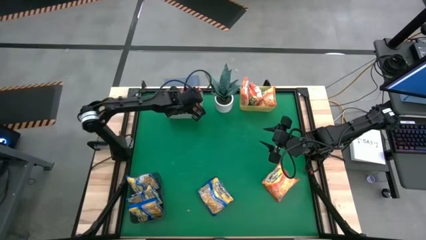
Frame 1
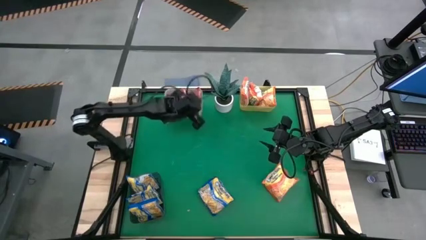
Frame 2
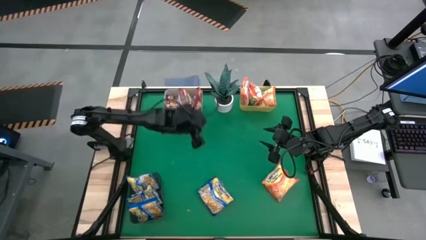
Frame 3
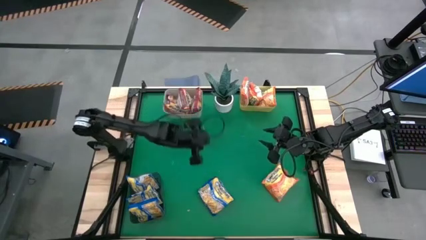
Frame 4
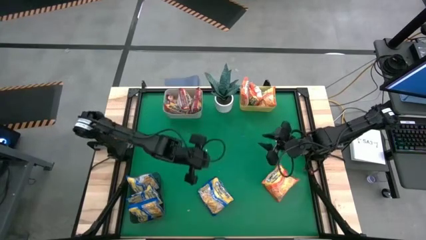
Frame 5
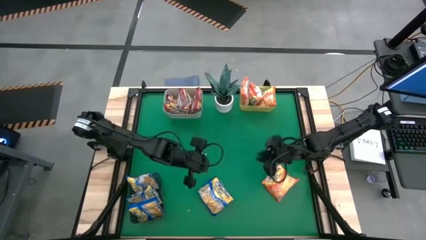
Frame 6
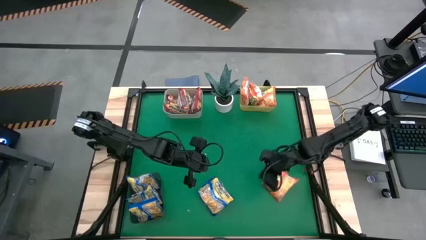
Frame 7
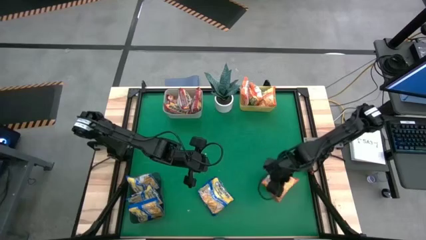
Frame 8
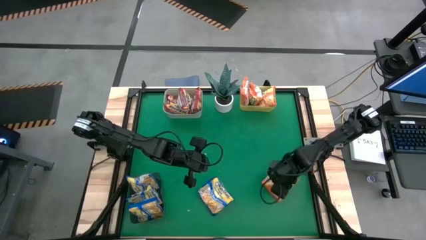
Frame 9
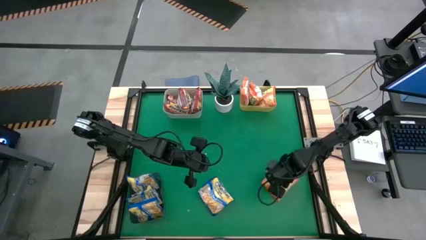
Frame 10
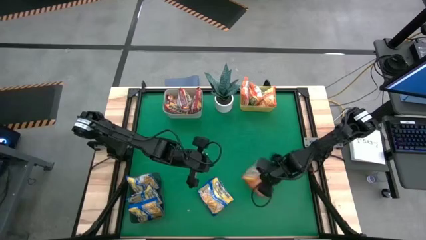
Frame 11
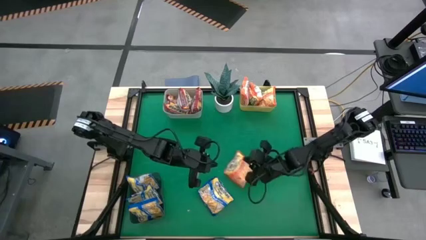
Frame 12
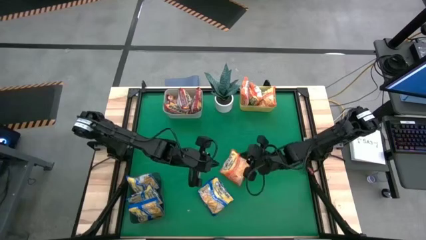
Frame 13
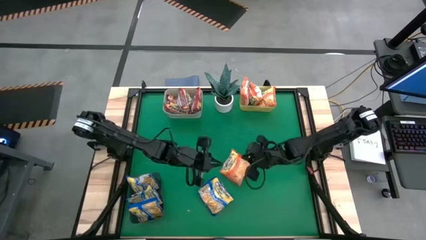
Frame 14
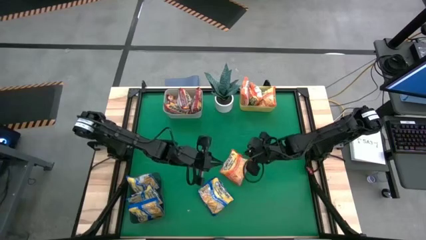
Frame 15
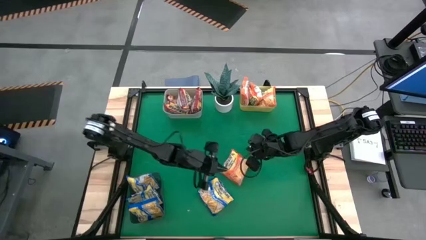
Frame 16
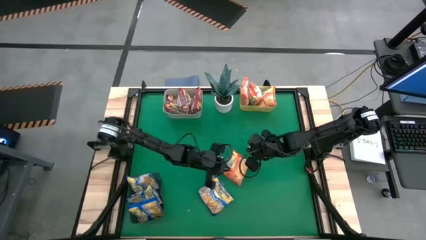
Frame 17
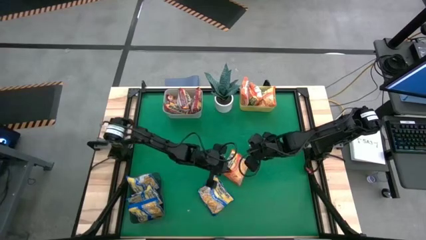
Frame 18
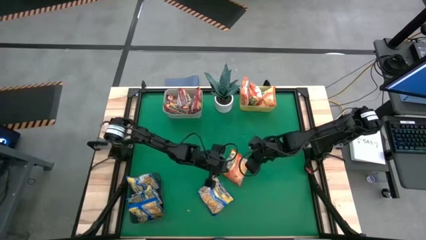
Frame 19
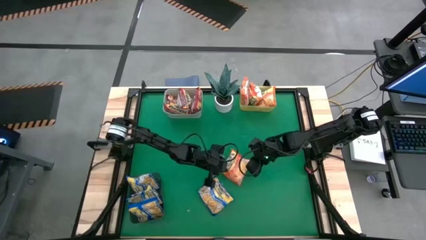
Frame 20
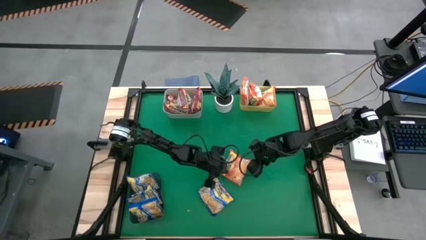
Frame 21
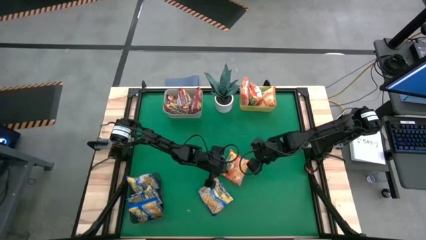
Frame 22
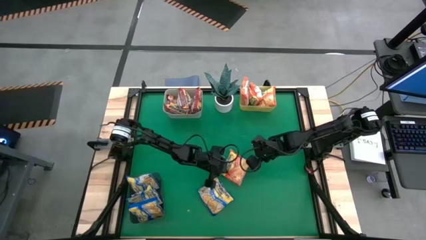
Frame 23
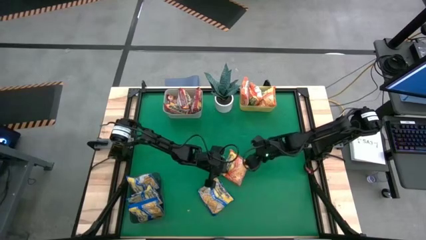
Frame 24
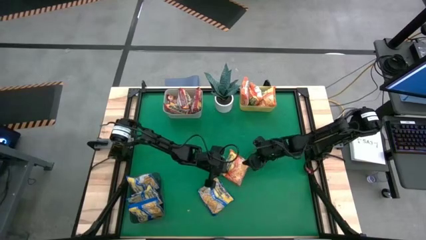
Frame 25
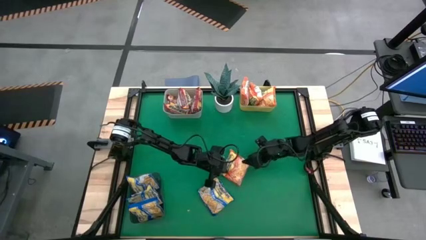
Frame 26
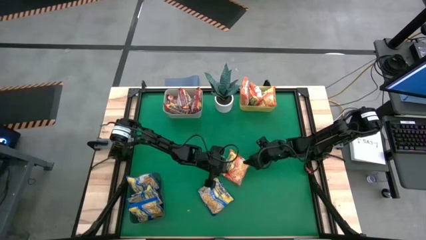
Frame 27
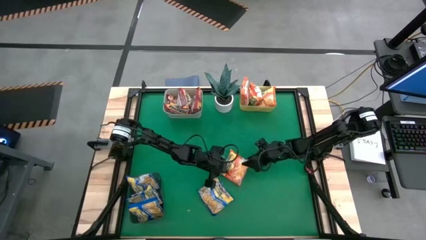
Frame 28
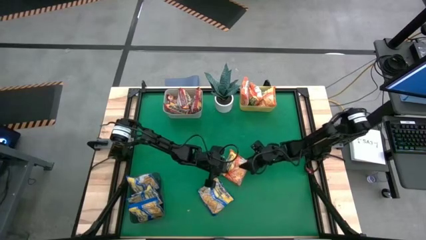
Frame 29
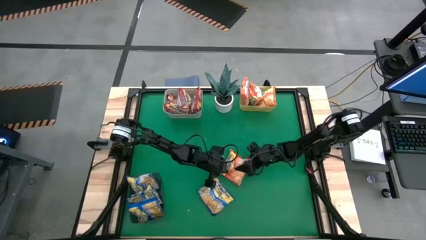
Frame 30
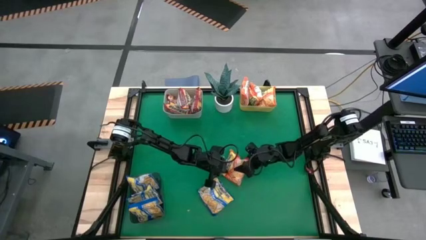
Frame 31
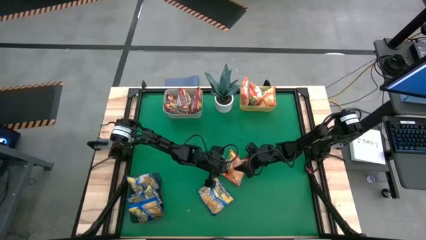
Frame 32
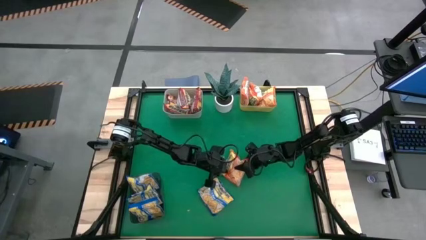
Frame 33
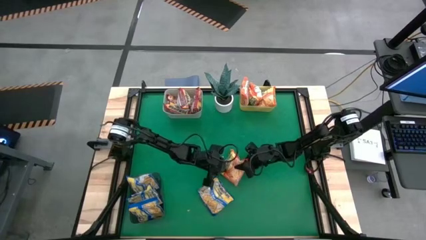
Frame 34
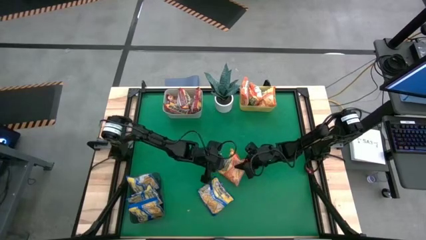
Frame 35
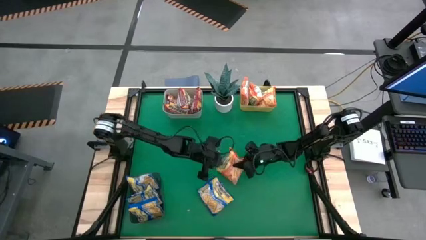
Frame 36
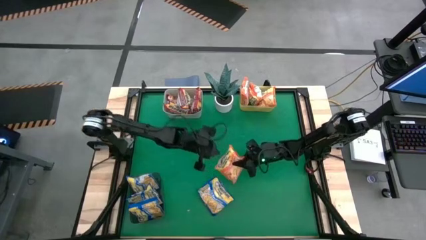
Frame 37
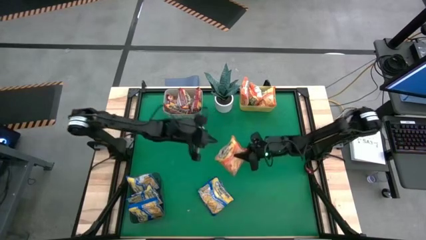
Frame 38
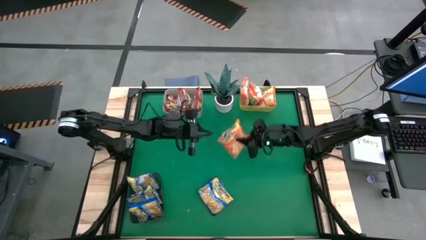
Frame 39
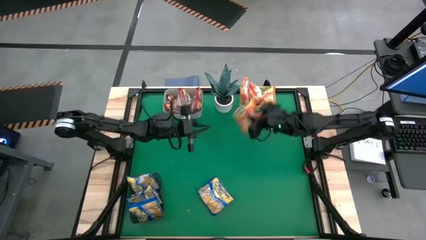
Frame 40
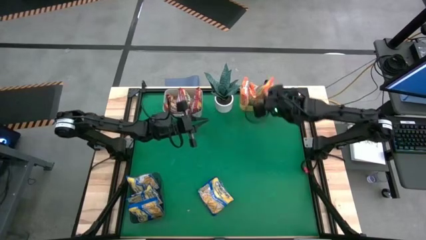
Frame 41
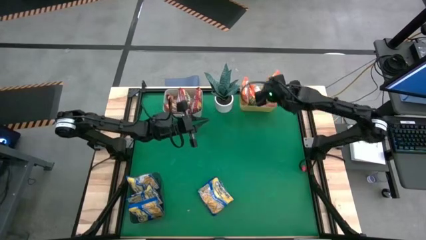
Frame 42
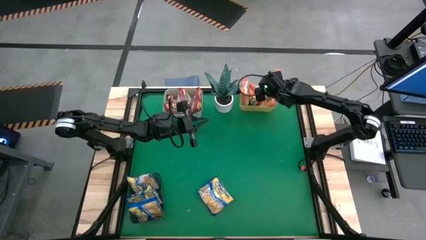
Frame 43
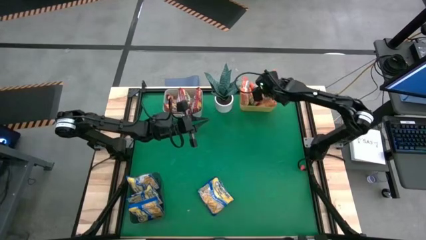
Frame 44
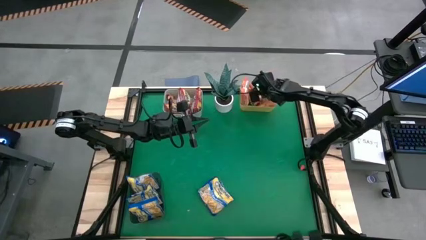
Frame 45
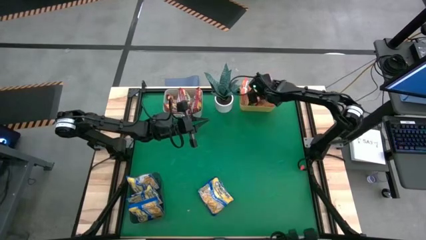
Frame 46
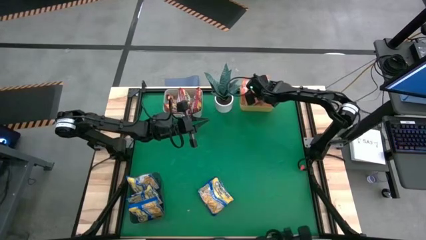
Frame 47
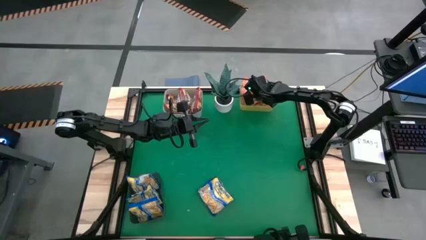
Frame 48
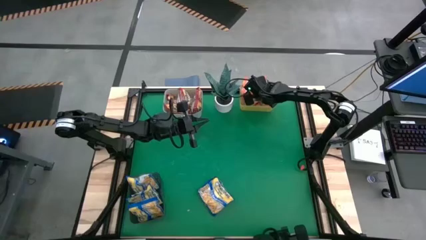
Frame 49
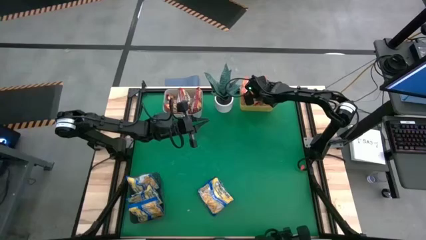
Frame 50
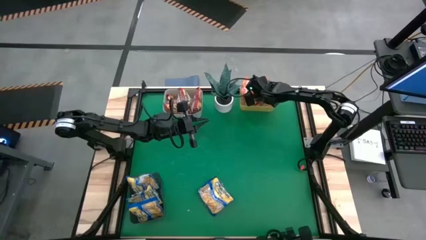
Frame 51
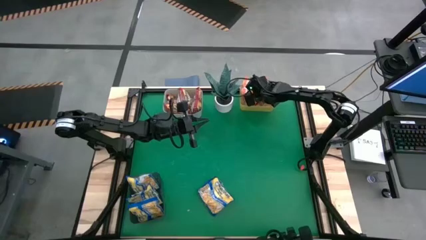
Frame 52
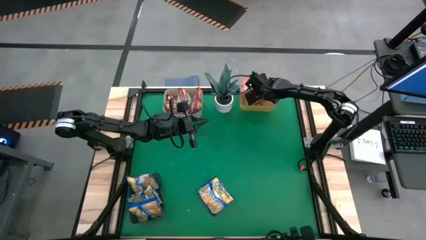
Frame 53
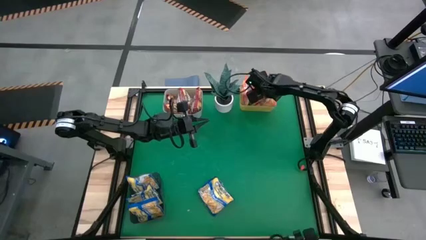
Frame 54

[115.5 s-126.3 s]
Task: Sort Maruchan noodles
Put the orange noodle pack into the yellow bin

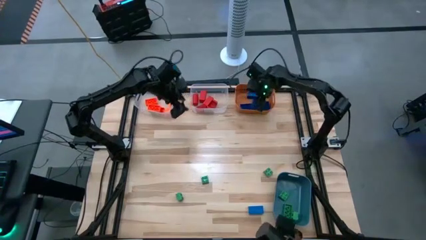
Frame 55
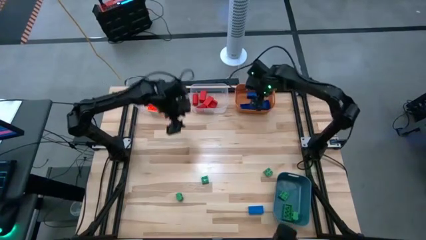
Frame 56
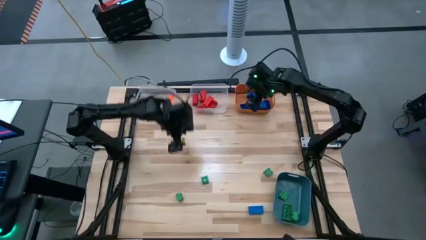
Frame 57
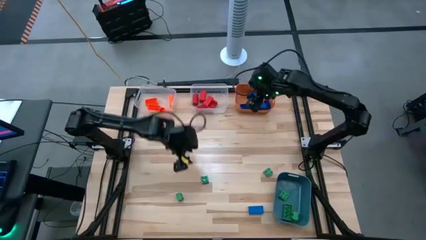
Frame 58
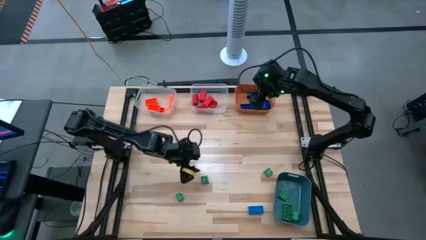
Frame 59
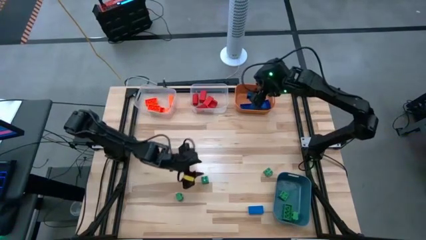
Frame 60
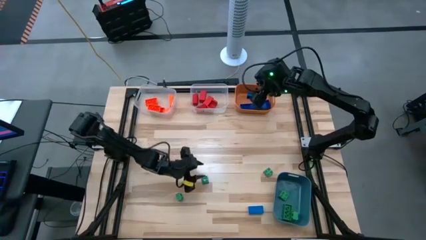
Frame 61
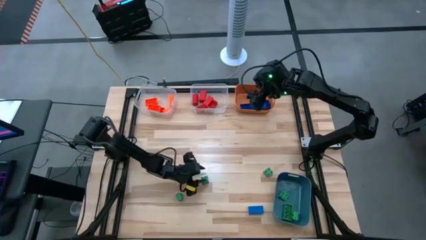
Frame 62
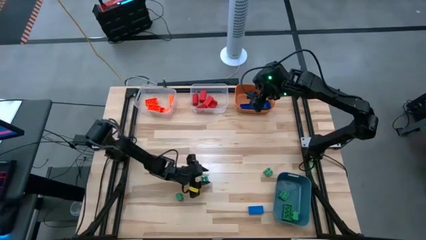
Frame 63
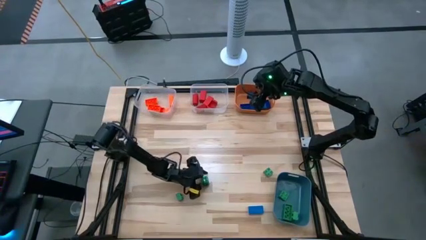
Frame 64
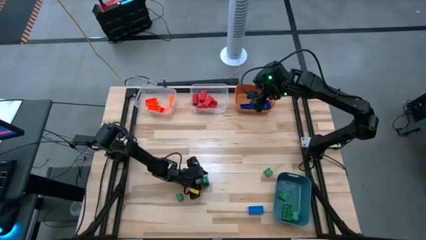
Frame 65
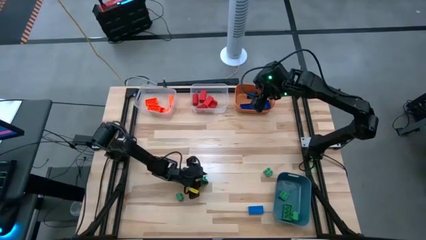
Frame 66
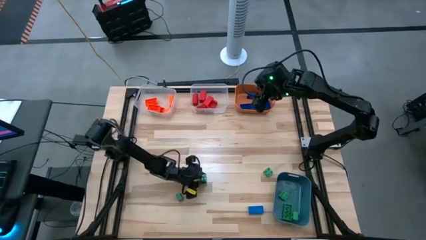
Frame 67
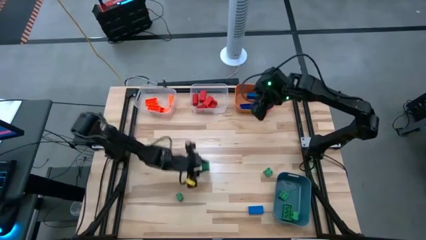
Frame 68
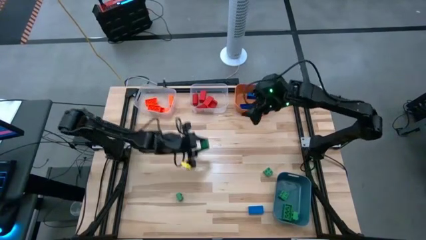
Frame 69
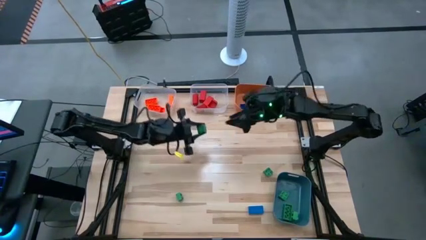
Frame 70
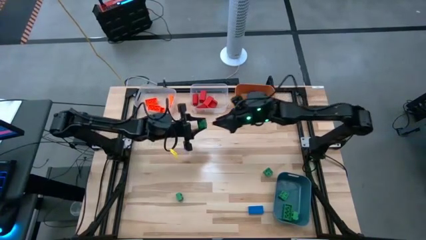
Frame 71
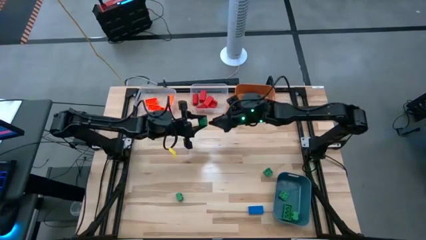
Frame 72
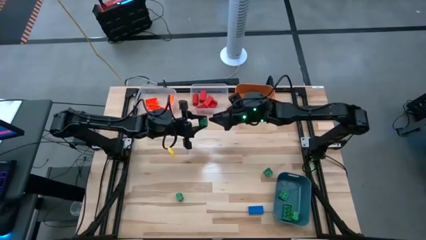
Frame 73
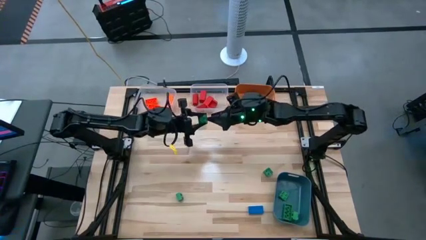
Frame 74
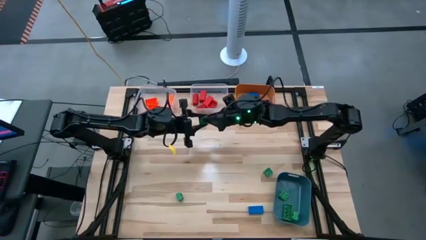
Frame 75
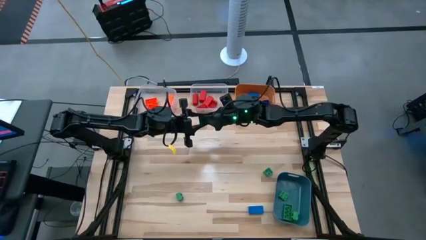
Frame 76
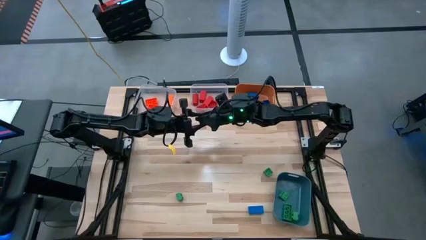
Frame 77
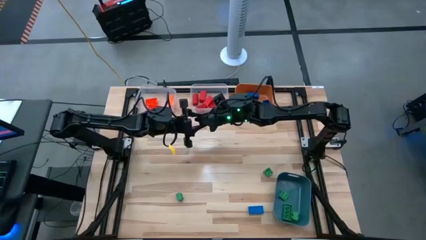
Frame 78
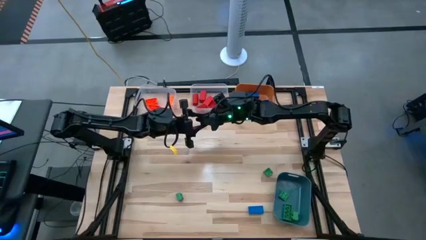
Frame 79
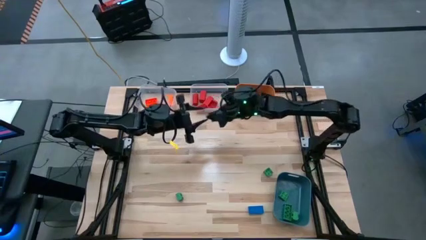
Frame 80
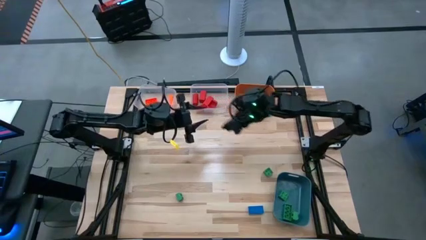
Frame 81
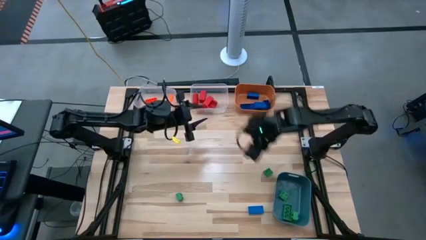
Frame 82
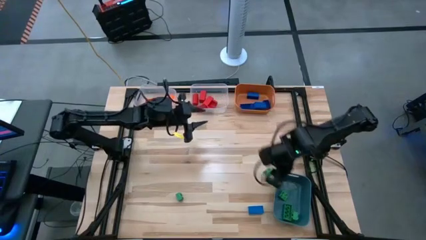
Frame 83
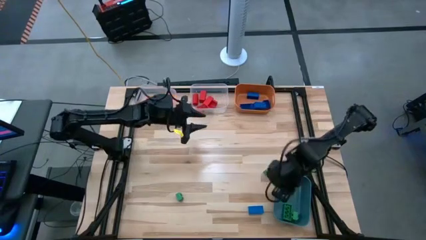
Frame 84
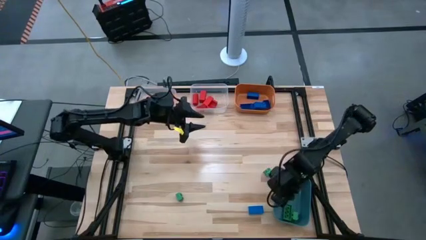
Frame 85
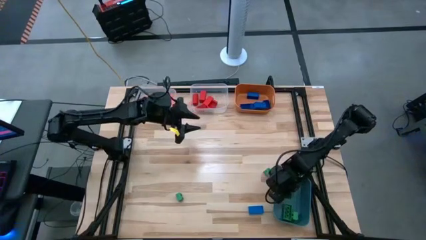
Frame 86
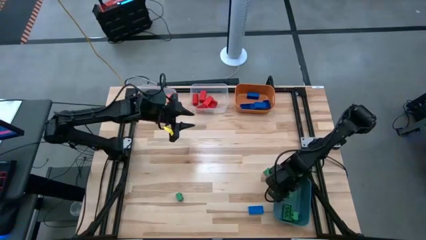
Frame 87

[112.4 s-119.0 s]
Task: Sort blocks
Put the green game piece into the blue bin
